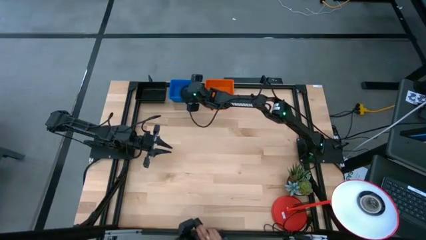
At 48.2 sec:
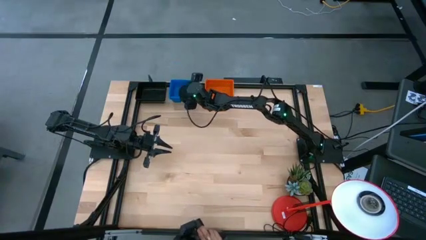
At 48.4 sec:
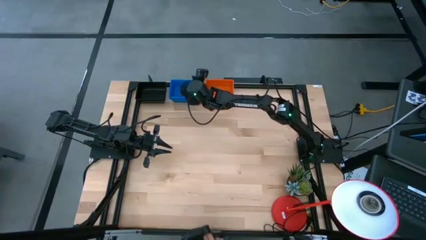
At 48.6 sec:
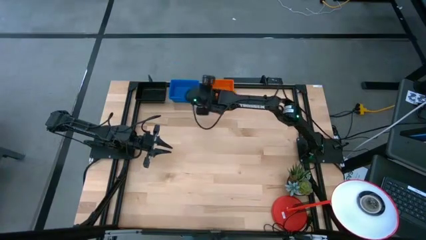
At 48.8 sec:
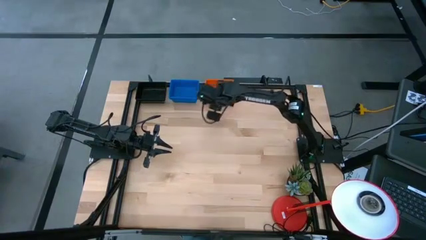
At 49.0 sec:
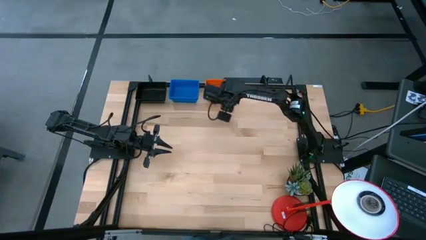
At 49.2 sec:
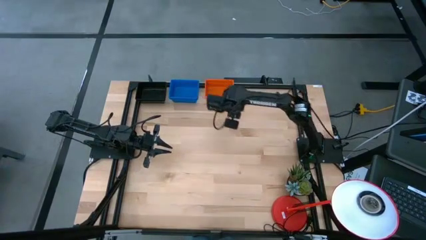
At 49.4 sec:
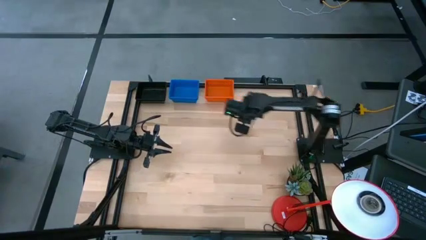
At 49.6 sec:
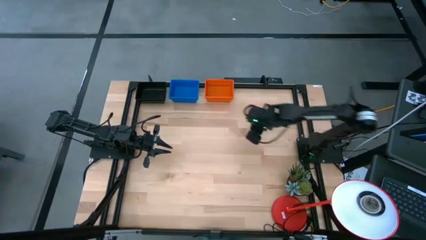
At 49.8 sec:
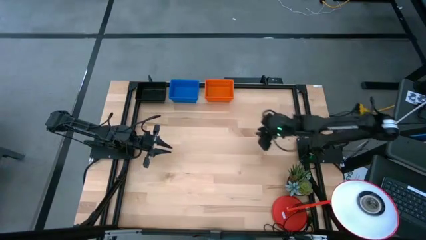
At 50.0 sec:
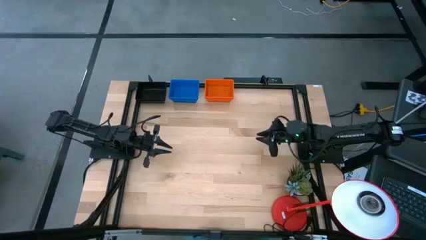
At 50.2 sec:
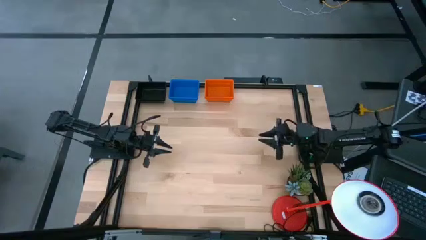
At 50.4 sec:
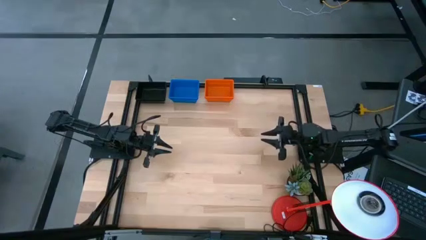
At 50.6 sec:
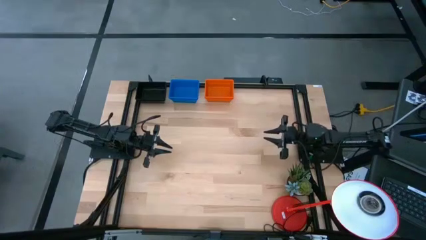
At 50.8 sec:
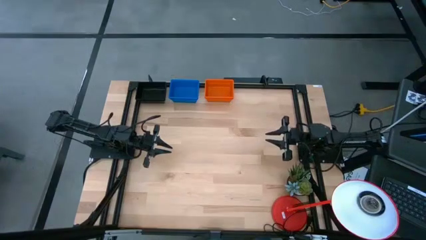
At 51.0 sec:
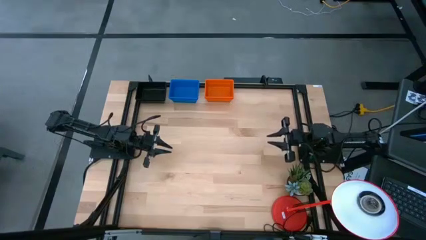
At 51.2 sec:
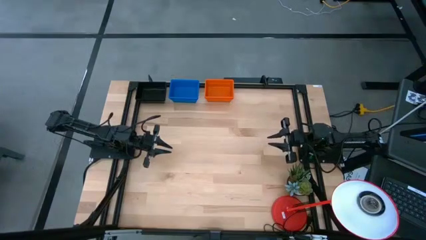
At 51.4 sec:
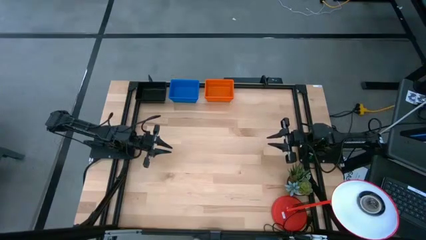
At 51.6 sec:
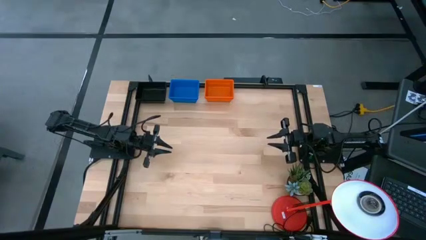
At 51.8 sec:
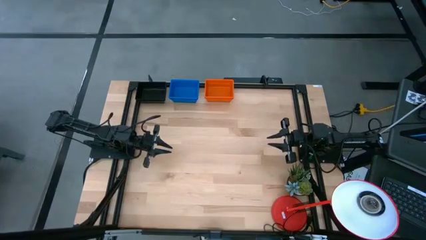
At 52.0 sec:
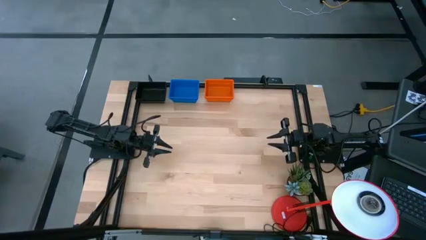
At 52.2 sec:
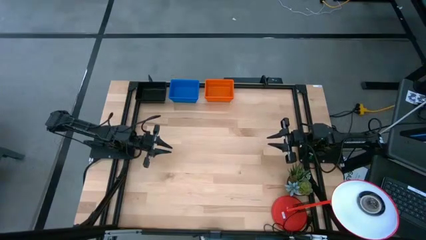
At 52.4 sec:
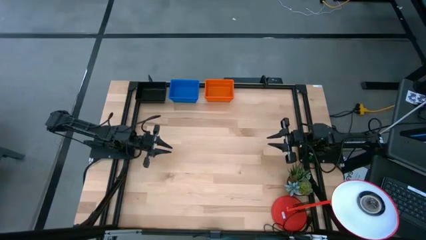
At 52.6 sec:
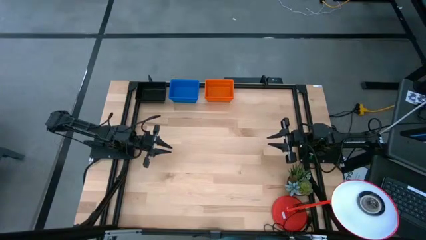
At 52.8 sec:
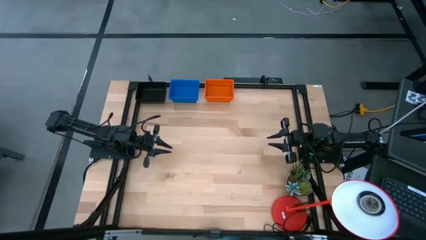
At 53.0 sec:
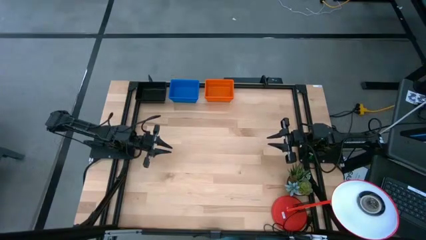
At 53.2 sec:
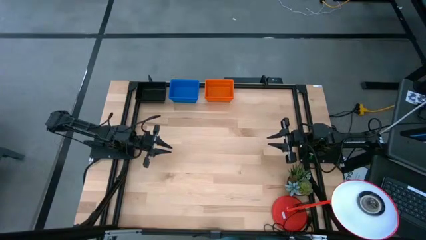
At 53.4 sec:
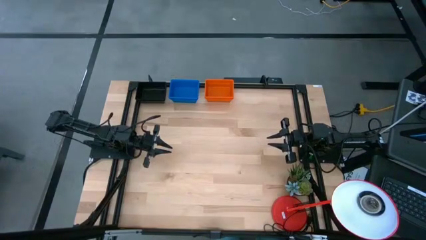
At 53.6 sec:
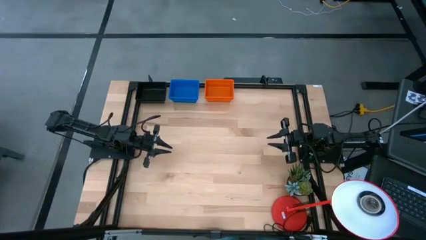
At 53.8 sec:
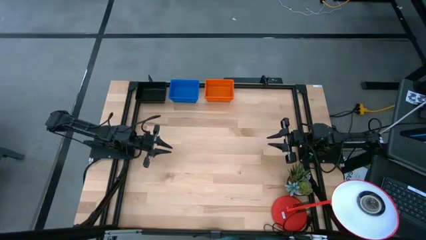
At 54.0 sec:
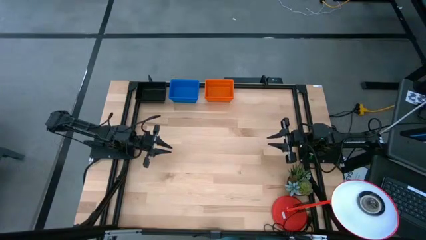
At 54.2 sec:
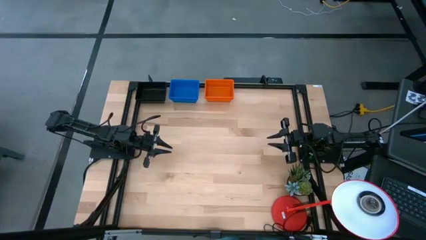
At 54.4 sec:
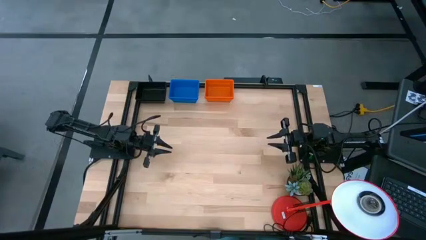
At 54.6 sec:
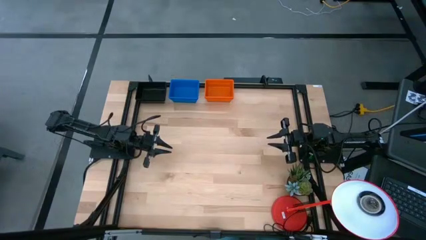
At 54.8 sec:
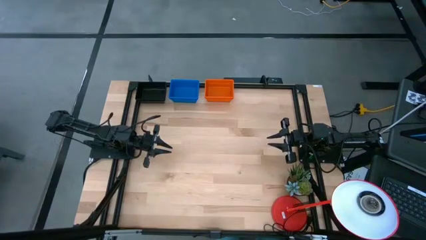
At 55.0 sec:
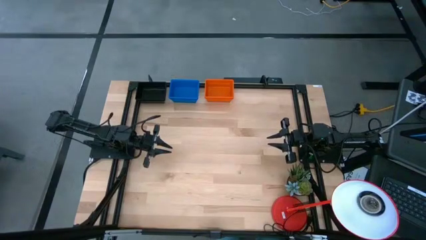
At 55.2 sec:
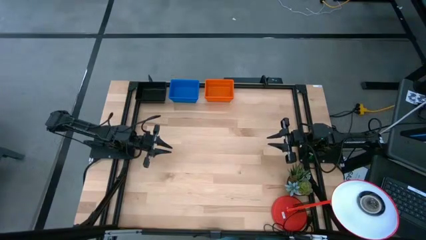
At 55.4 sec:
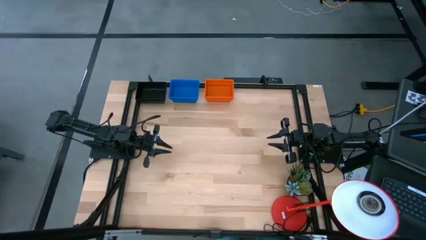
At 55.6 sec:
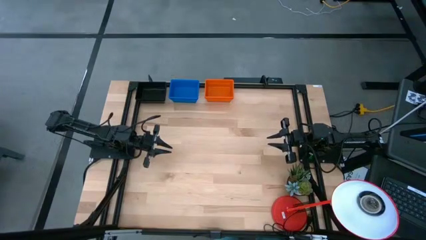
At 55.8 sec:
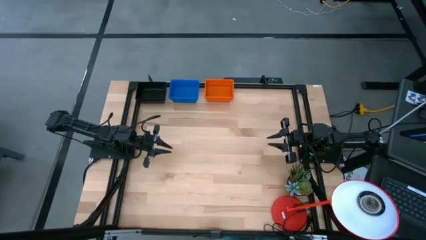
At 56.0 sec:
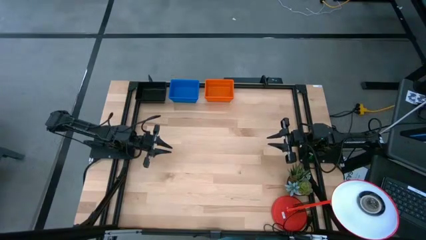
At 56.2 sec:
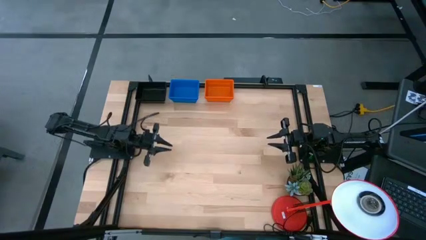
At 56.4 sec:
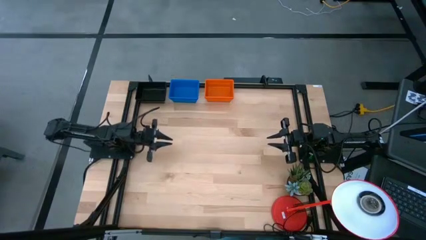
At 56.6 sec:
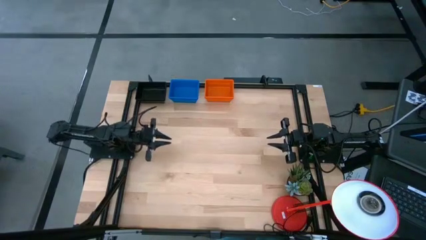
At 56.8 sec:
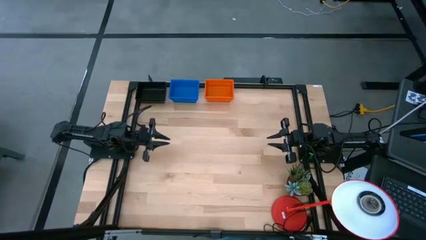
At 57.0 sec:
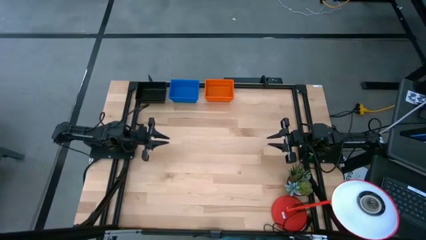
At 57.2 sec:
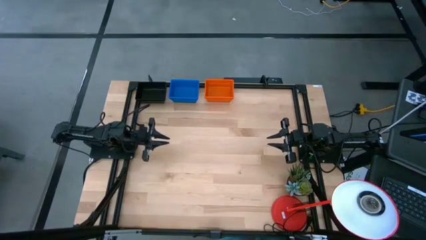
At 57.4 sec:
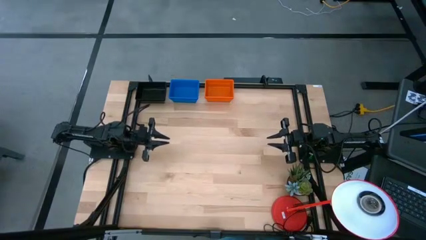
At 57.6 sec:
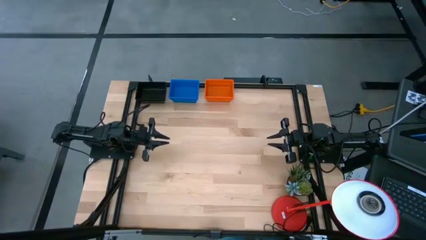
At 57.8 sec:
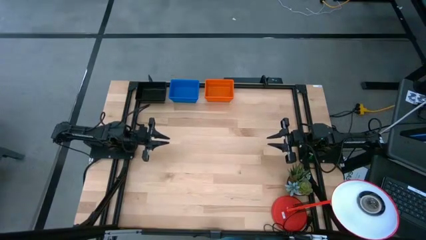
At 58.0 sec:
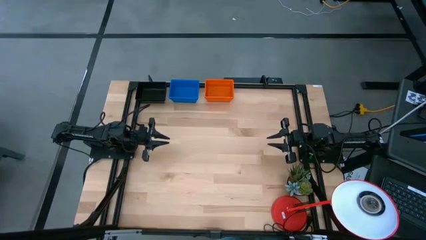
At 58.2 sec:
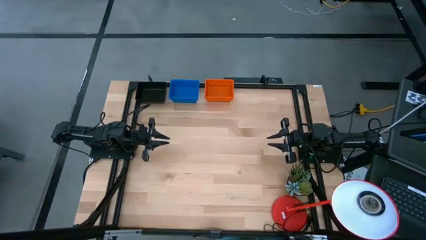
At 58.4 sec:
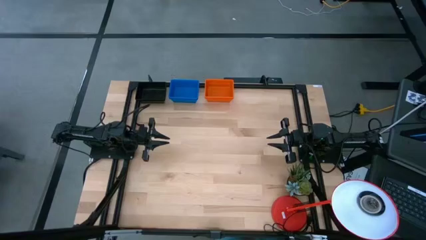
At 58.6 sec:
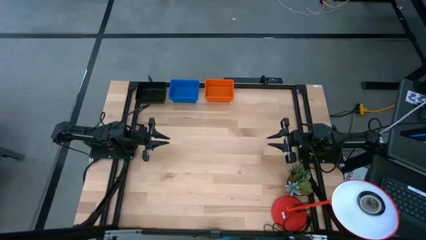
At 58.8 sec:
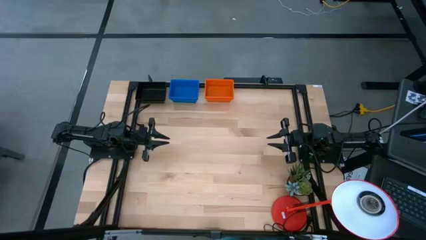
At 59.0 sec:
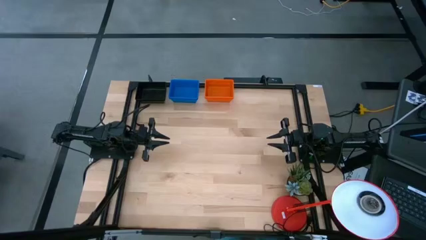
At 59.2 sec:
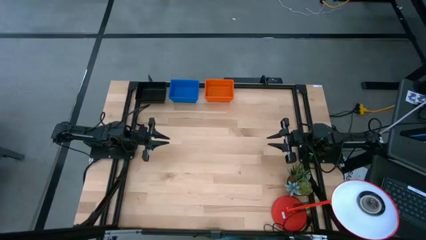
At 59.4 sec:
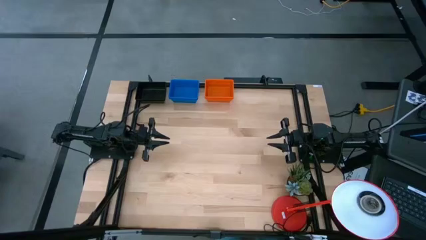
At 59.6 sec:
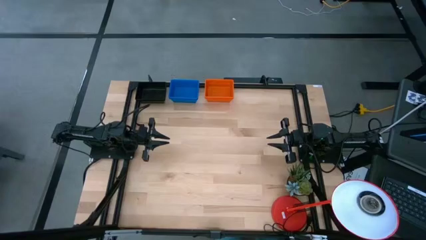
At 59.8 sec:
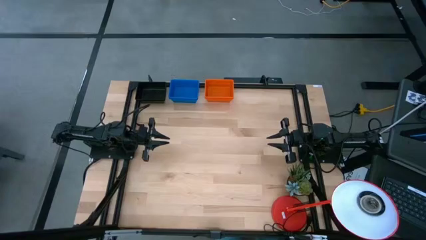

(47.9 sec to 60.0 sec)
Return to Home Position
